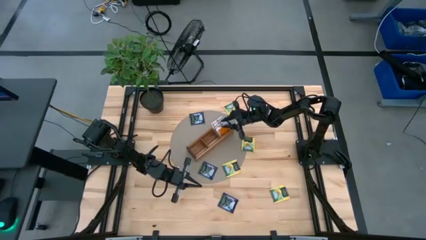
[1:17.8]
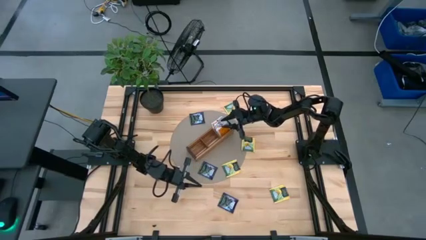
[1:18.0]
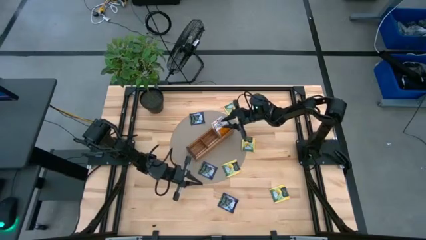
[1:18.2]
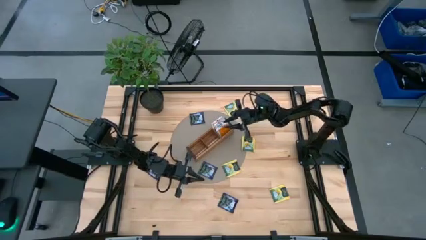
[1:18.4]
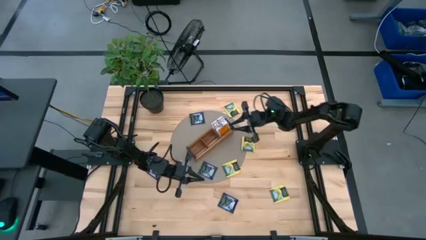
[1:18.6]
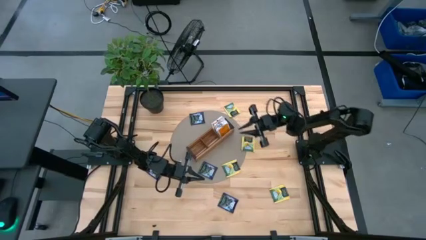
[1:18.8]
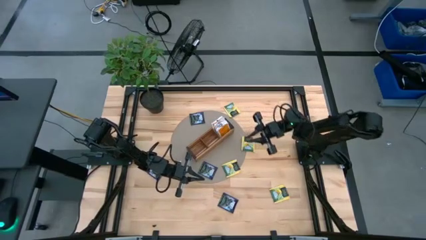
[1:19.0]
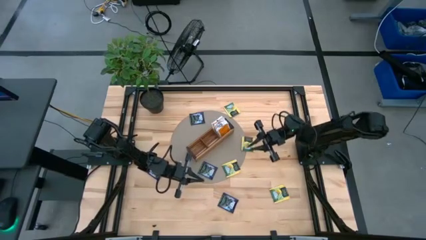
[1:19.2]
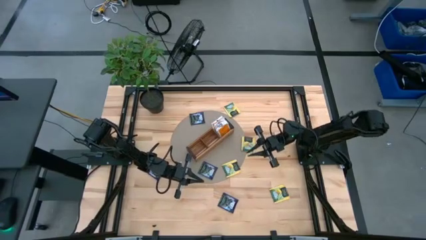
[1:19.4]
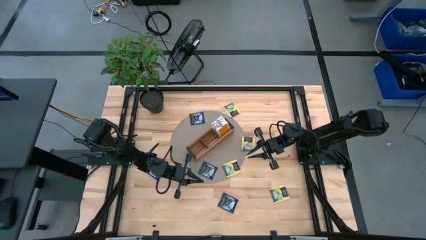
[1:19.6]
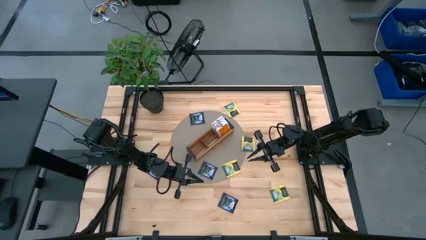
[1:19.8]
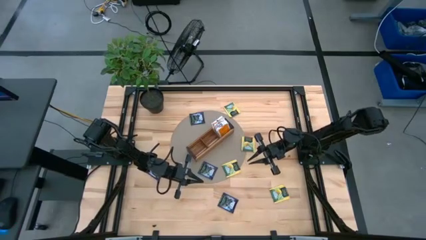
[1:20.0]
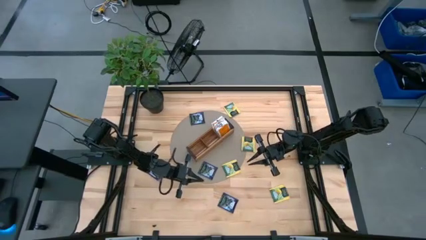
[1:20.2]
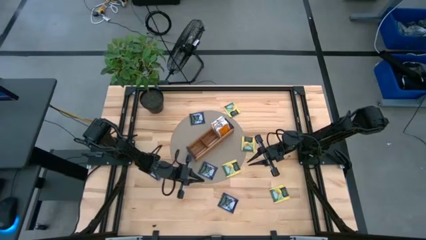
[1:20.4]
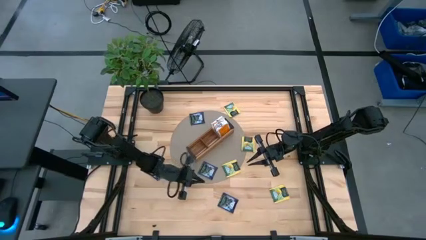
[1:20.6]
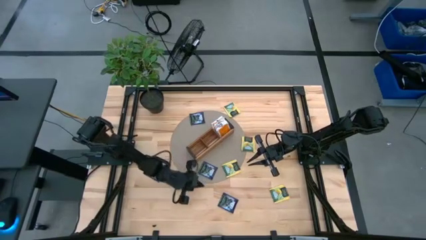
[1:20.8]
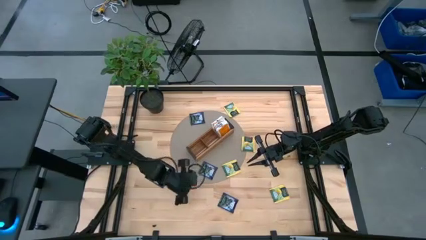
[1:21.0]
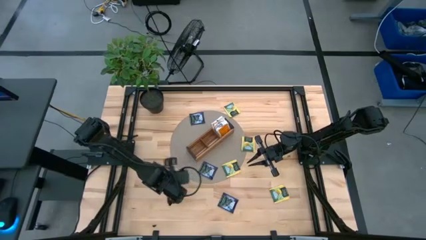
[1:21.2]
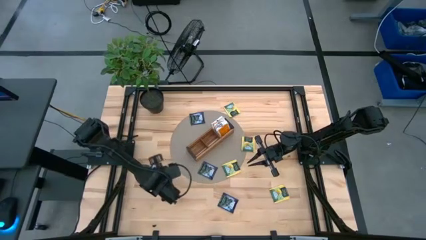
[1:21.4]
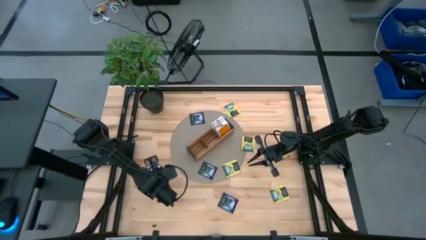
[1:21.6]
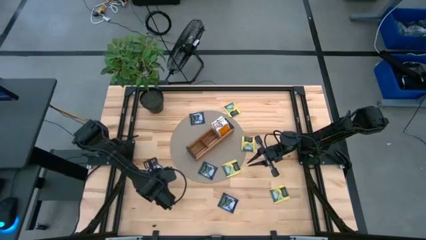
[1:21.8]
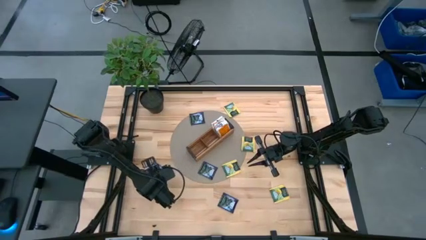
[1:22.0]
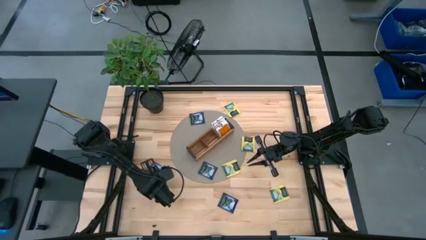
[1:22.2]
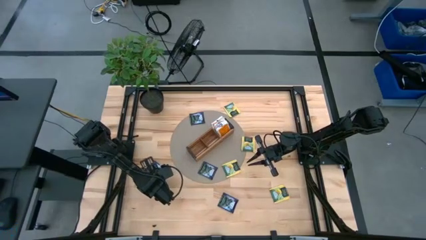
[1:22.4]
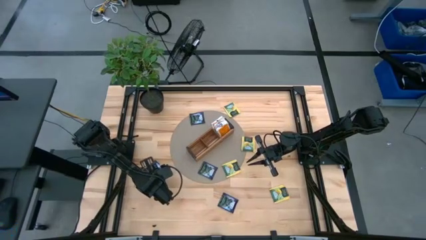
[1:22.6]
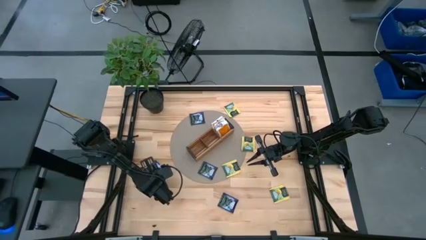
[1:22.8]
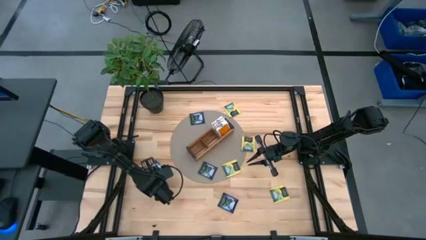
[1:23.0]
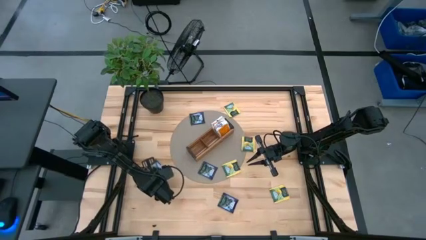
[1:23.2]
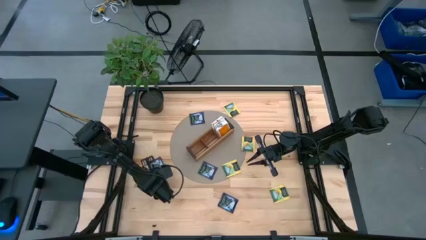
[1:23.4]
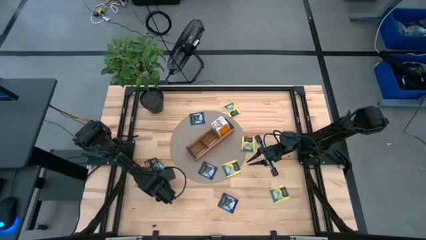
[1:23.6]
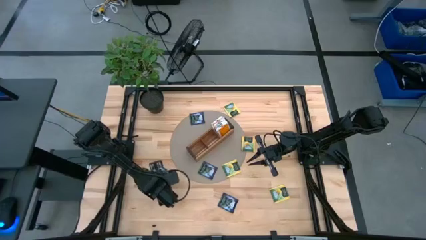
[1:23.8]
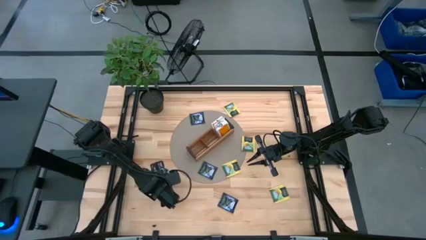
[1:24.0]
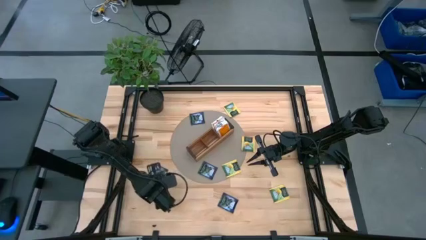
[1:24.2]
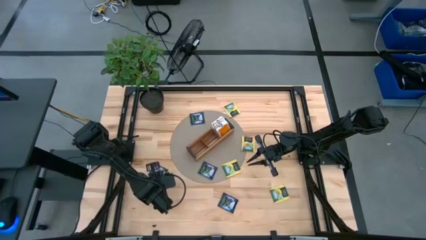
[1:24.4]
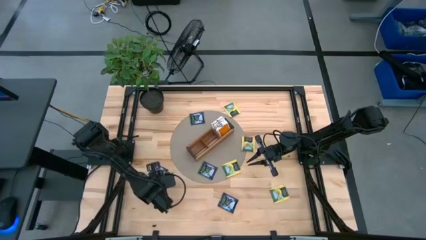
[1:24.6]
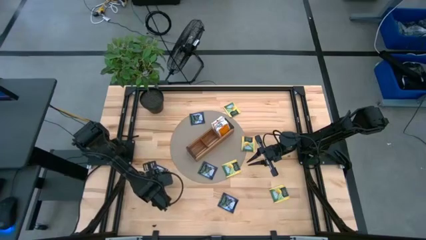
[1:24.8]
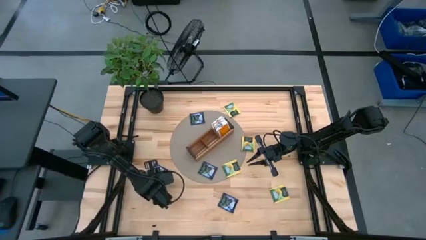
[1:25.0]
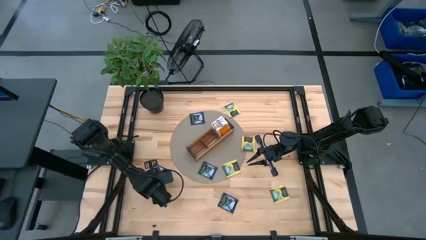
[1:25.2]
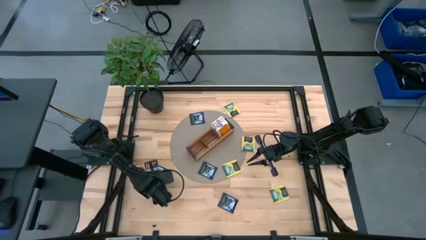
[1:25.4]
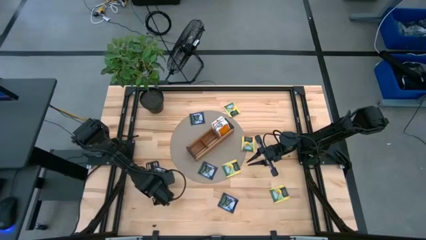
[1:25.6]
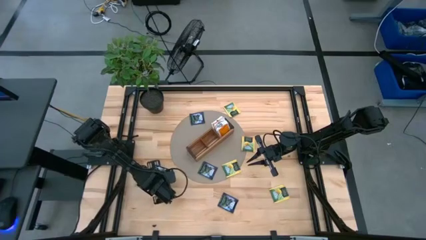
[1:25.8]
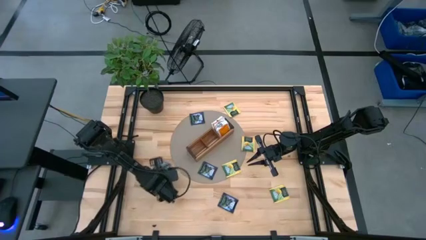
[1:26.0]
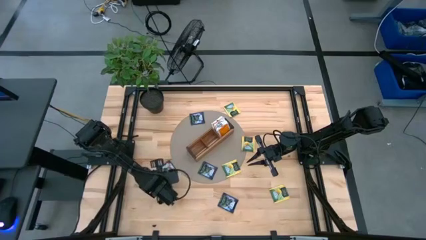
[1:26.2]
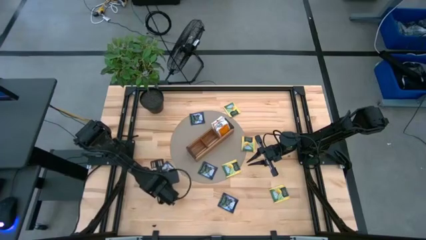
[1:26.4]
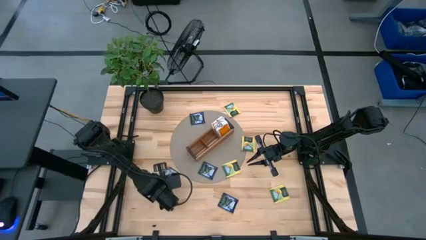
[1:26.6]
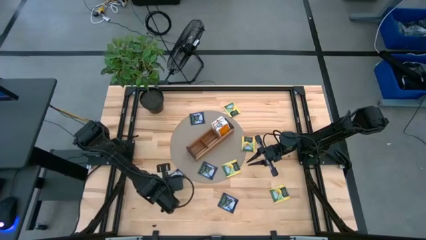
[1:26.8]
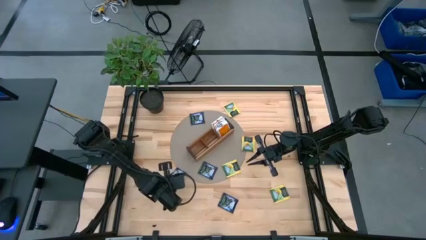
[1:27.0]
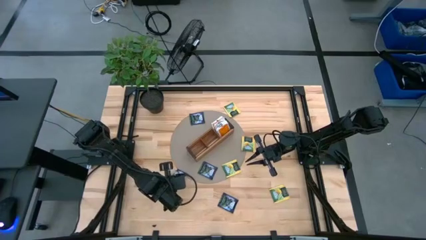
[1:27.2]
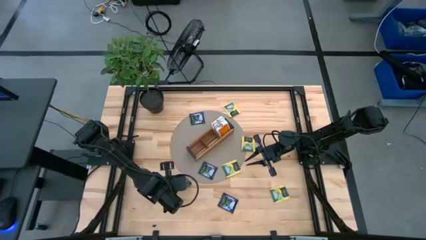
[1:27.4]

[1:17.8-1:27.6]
Task: Pick & Place Tea
Put the purple tea bag into the middle section of the wooden organizer

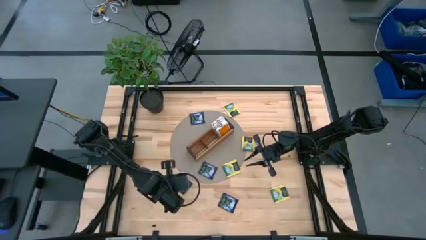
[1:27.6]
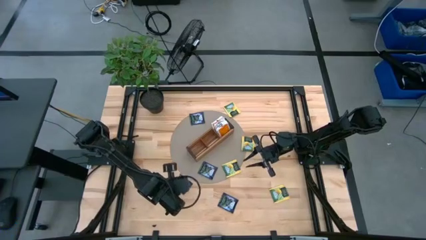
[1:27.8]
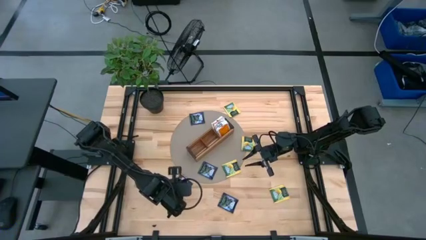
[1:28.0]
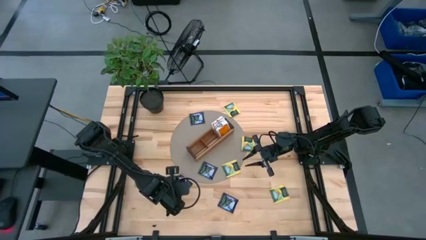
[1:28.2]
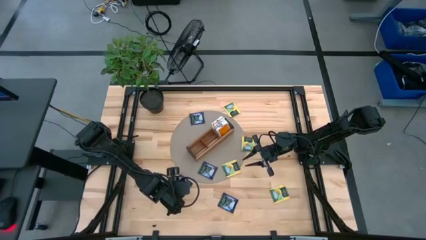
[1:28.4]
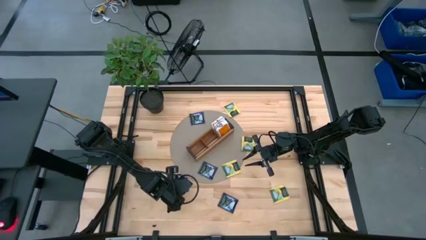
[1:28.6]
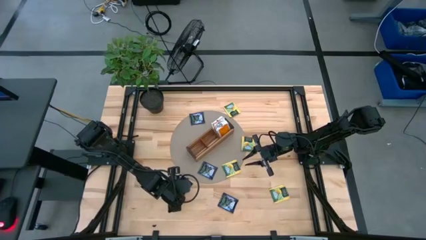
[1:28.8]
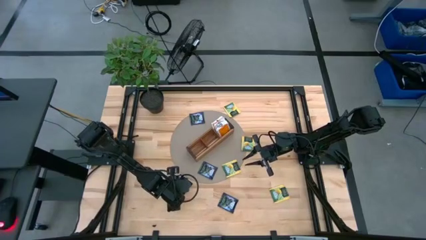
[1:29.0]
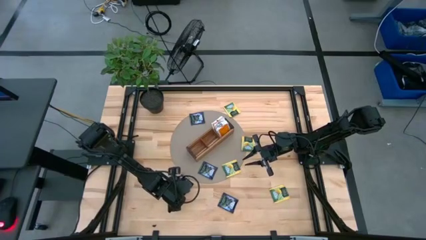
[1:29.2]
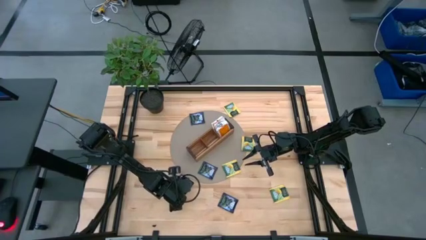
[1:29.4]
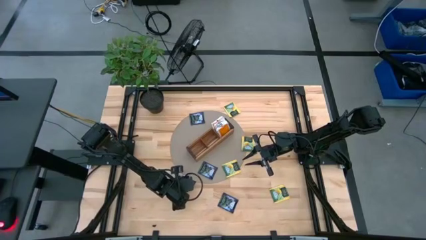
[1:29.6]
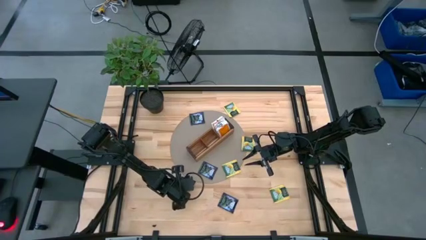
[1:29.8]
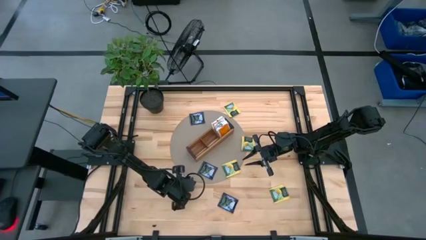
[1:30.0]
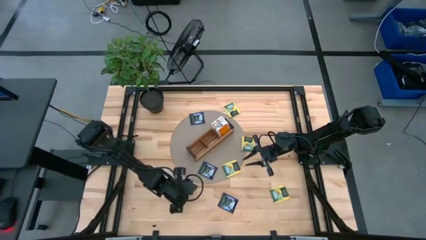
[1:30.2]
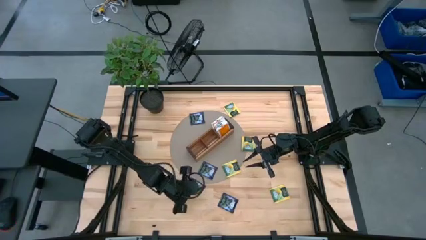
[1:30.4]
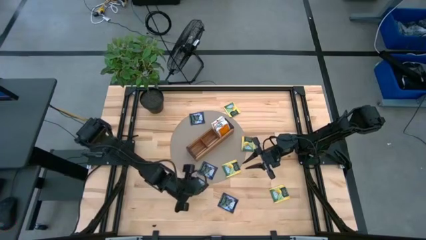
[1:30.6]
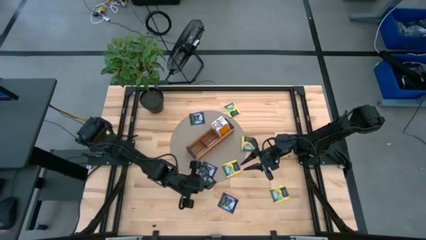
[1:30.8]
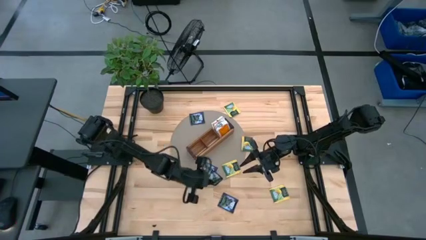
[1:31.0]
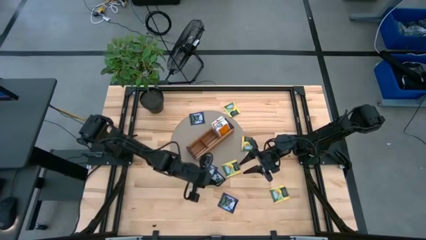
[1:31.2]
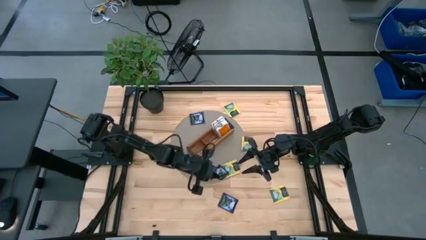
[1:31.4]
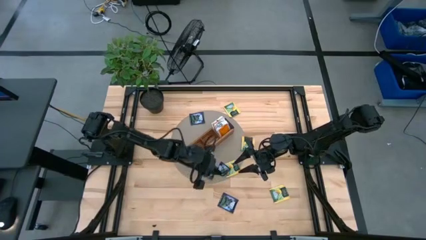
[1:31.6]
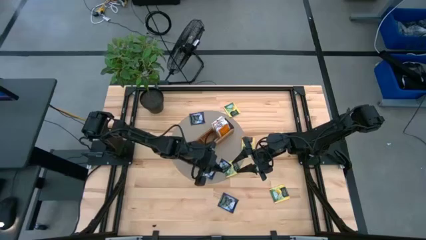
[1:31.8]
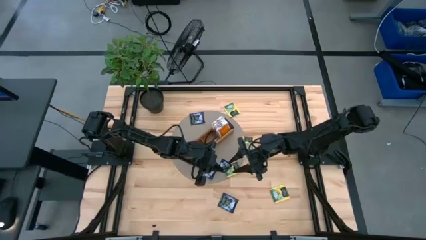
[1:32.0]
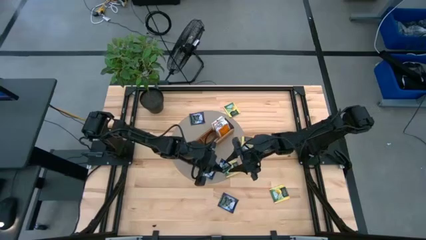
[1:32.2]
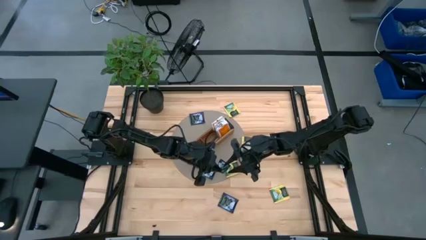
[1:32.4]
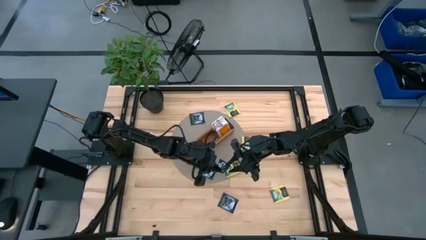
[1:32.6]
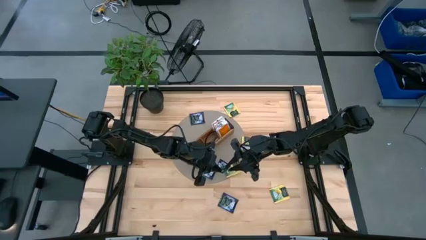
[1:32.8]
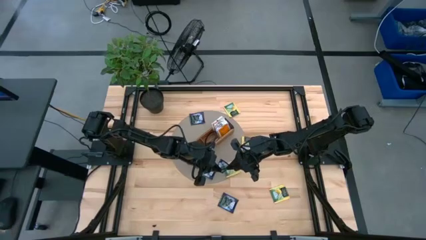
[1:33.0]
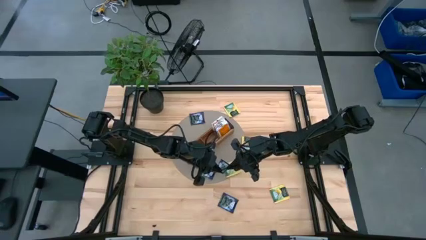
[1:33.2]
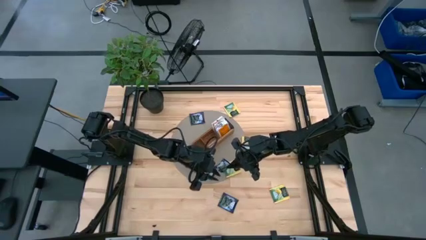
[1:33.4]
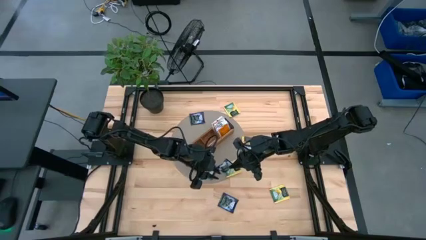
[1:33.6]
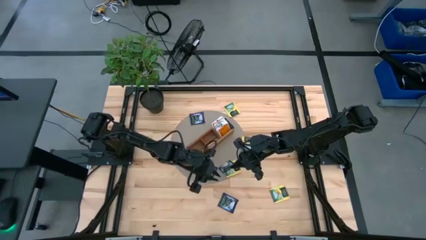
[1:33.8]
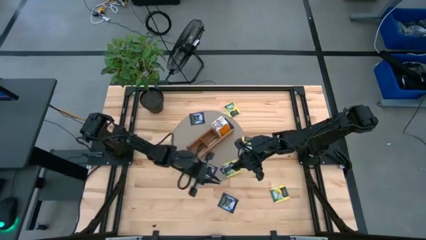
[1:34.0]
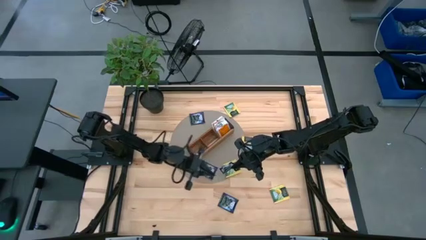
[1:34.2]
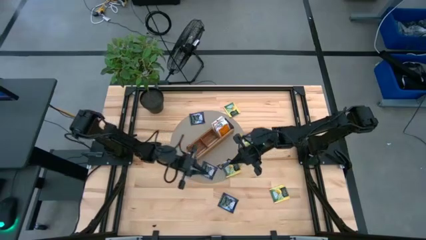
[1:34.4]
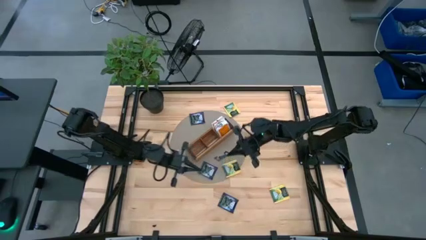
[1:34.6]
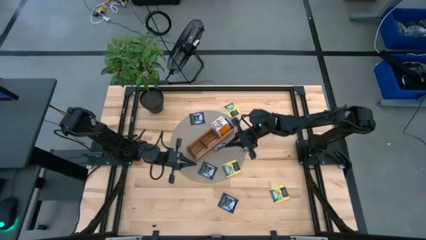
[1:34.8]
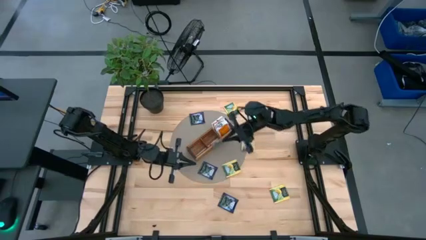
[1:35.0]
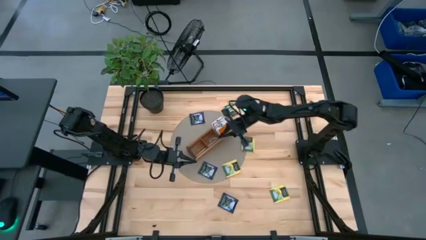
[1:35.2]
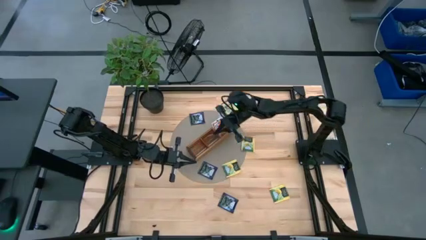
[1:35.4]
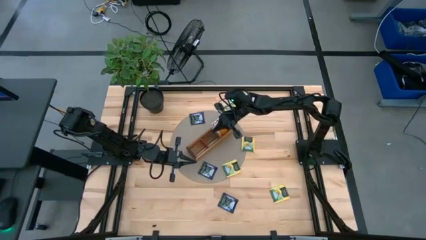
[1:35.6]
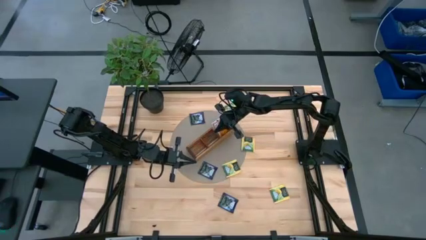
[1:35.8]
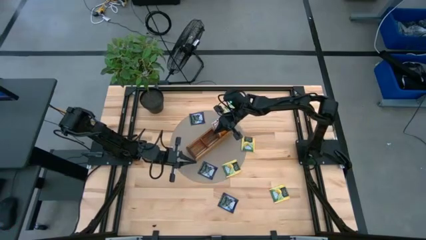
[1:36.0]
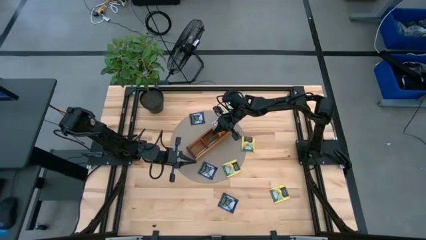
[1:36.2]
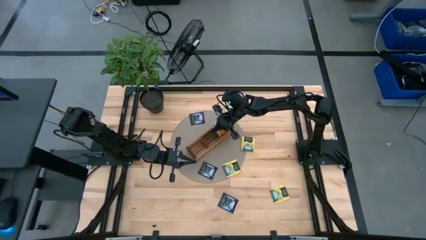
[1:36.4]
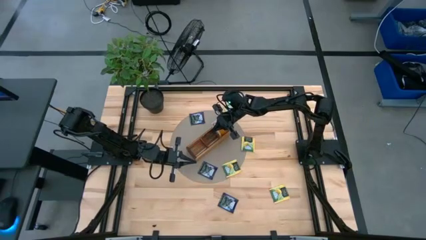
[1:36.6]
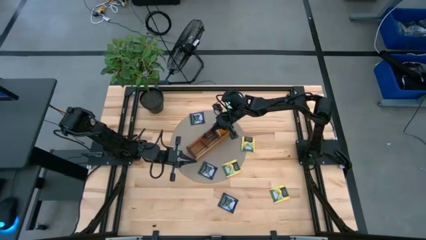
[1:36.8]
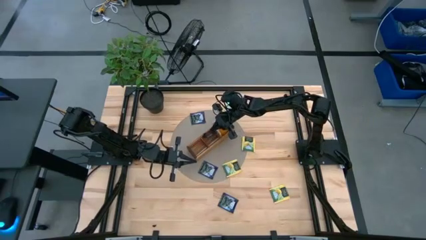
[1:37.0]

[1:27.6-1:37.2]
Put the purple tea bag into the middle section of the wooden organizer
